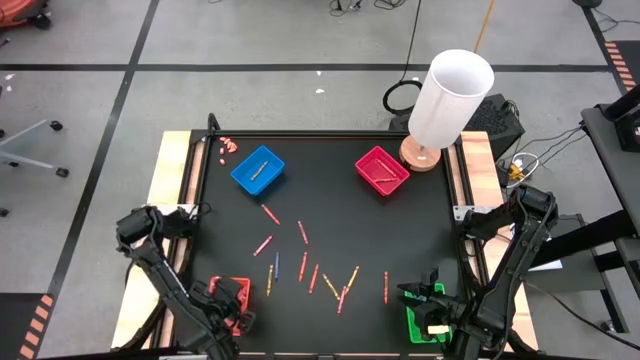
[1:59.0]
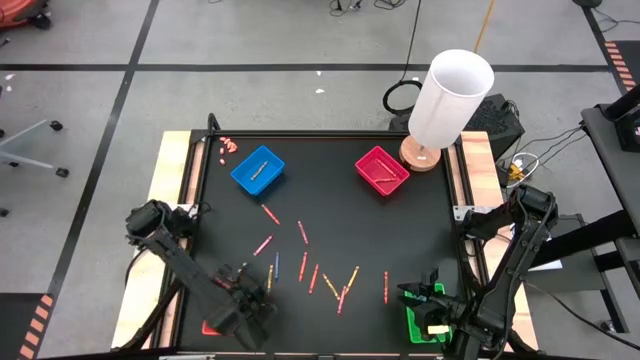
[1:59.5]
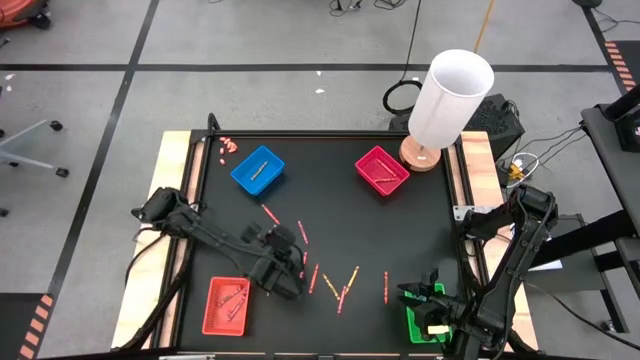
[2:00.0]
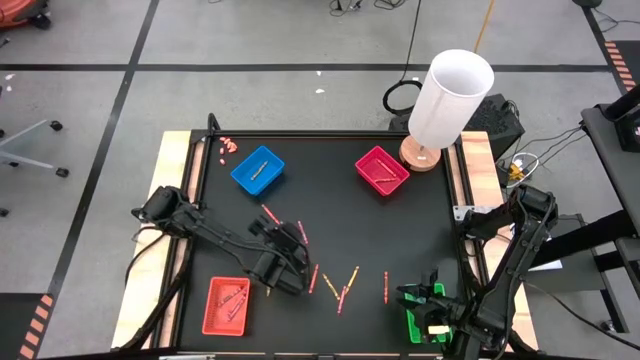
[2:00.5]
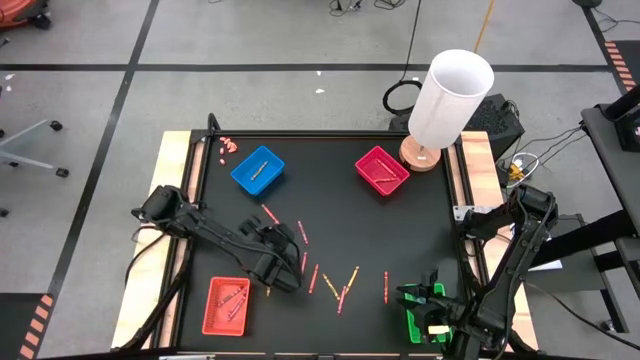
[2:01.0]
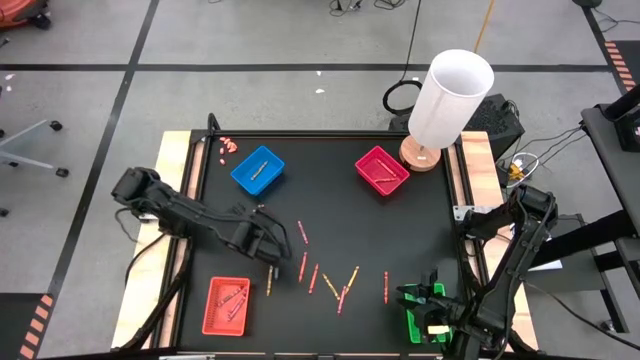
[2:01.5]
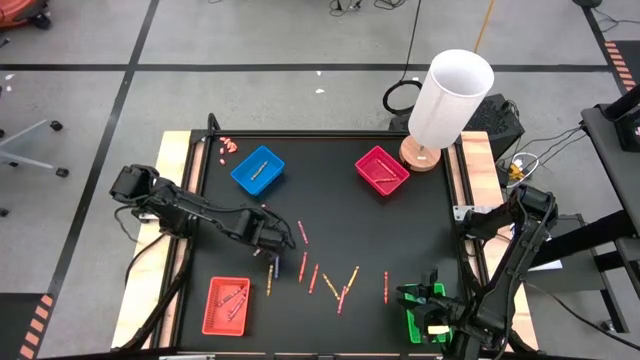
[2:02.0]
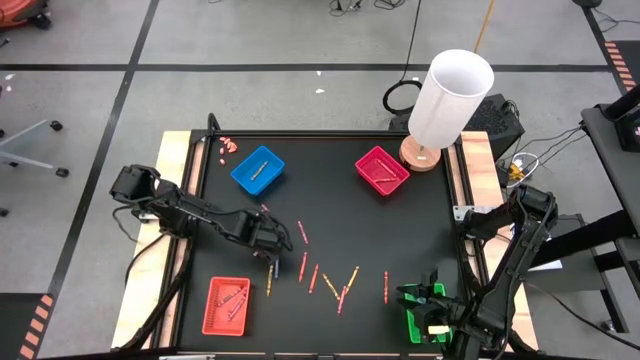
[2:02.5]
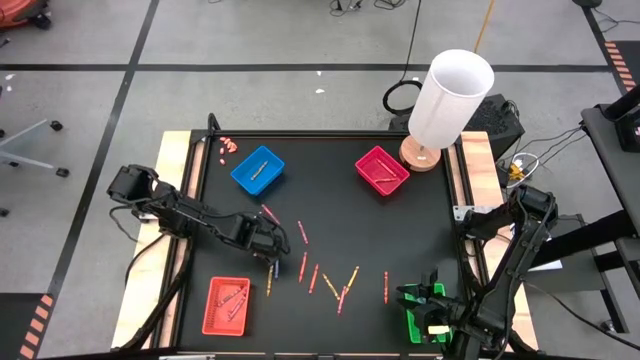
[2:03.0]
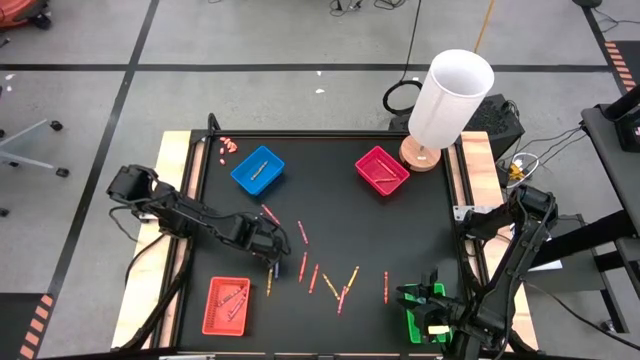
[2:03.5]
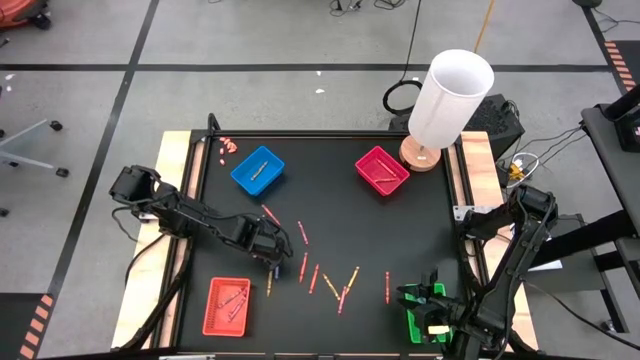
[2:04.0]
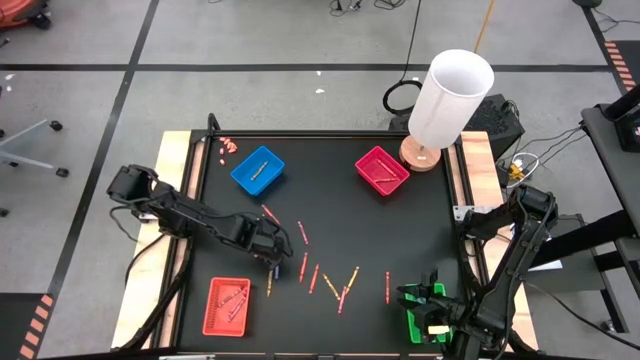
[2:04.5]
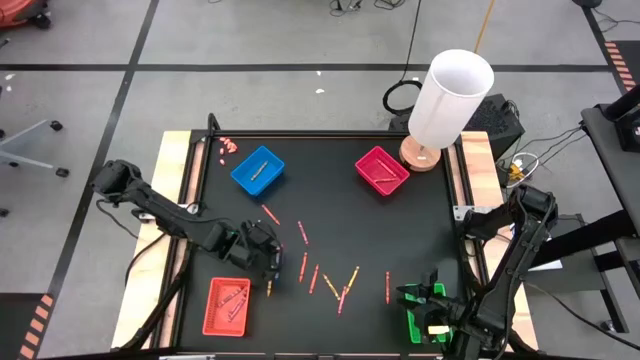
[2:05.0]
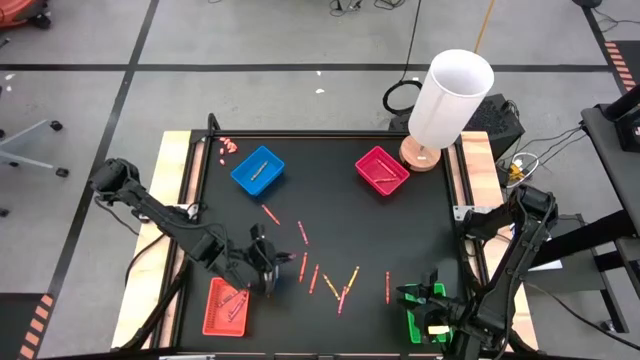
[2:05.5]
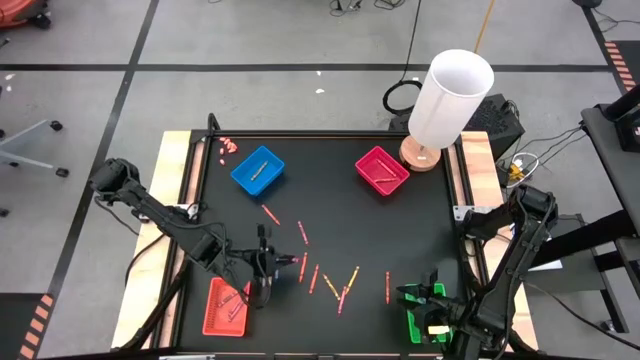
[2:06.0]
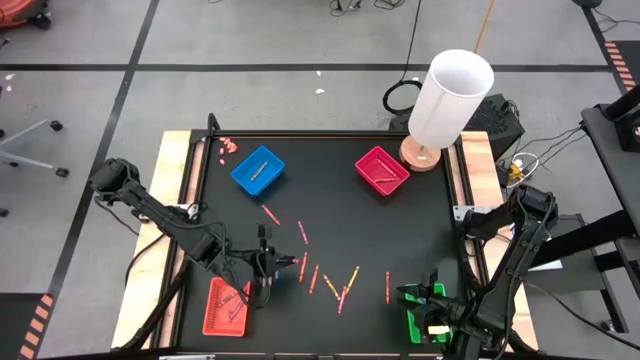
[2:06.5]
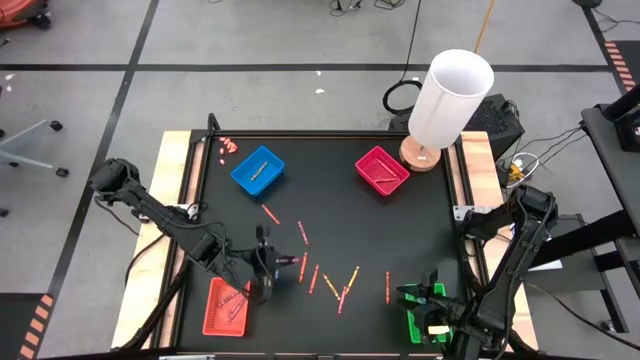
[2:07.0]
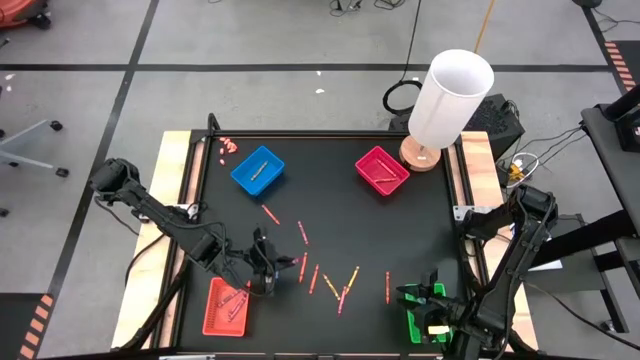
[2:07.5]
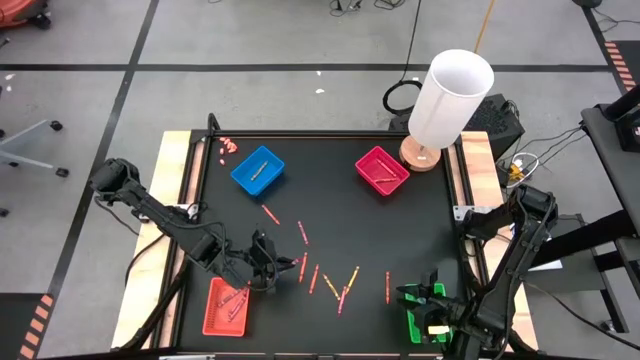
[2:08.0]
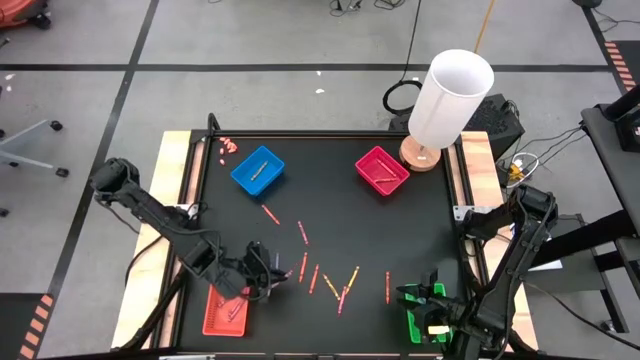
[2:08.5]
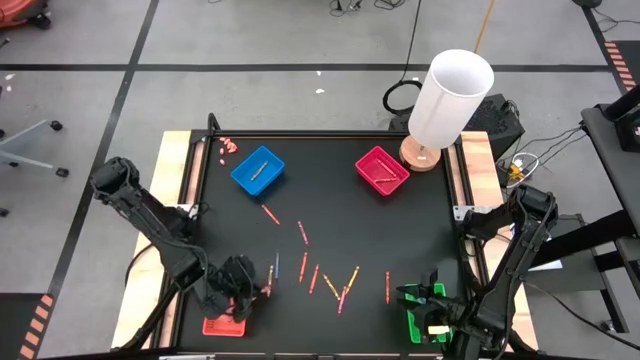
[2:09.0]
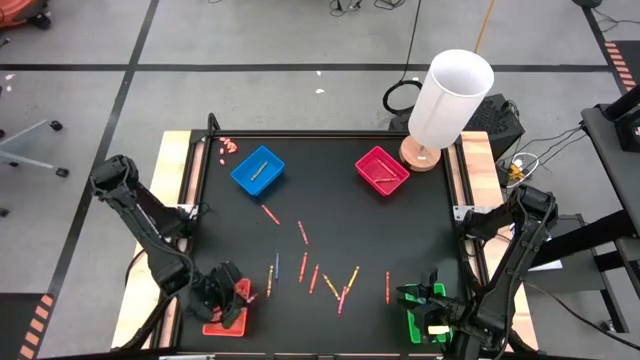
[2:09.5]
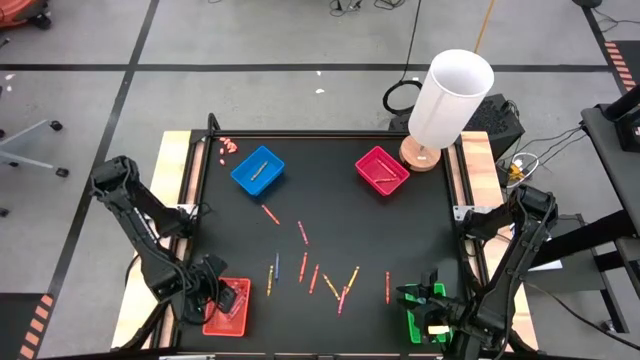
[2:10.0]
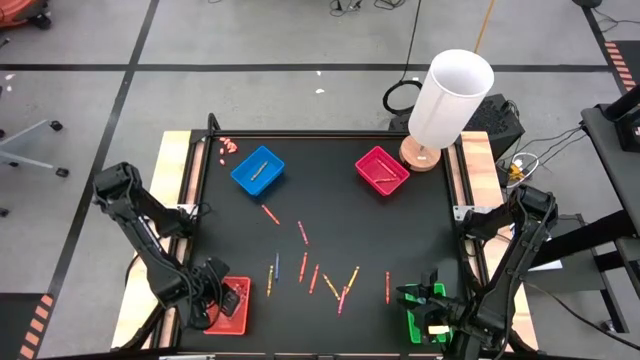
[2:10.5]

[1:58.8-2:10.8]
Task: Sort crayons
Put the red crayon into the orange bin

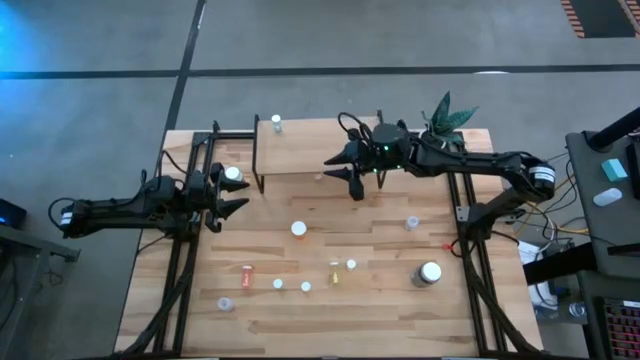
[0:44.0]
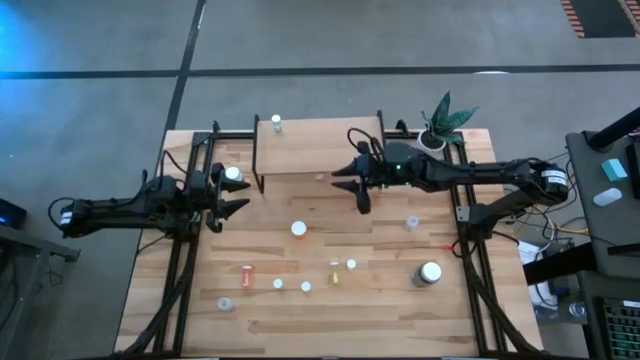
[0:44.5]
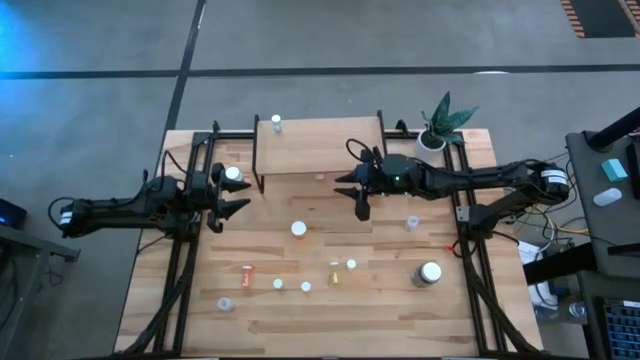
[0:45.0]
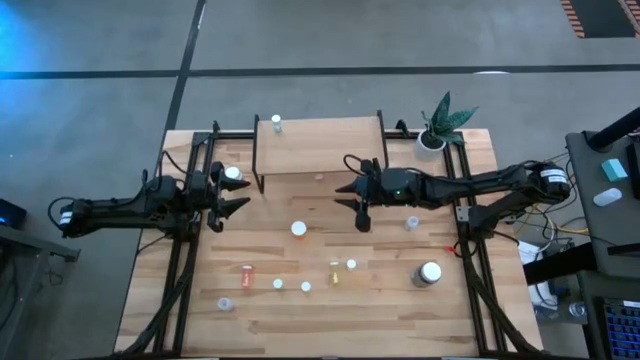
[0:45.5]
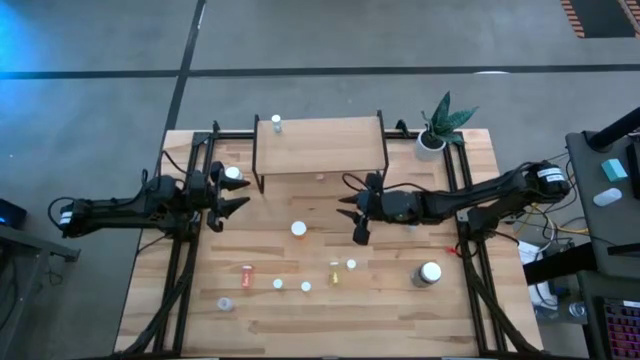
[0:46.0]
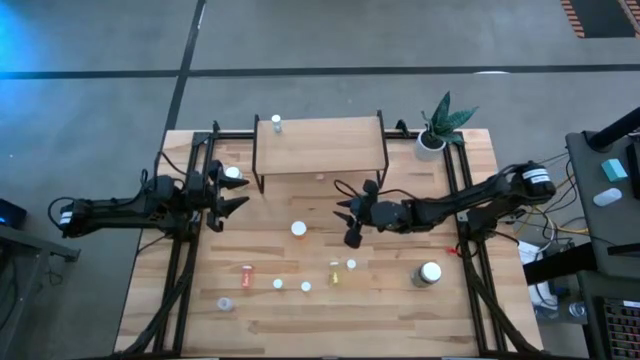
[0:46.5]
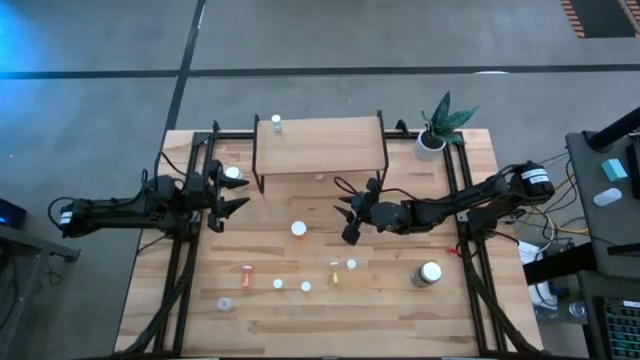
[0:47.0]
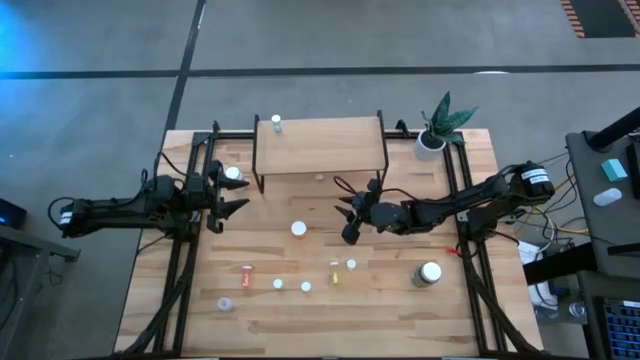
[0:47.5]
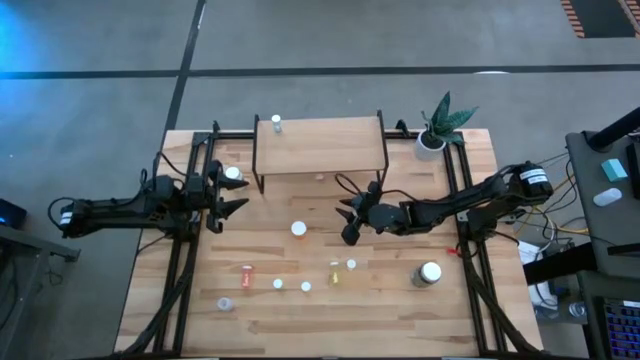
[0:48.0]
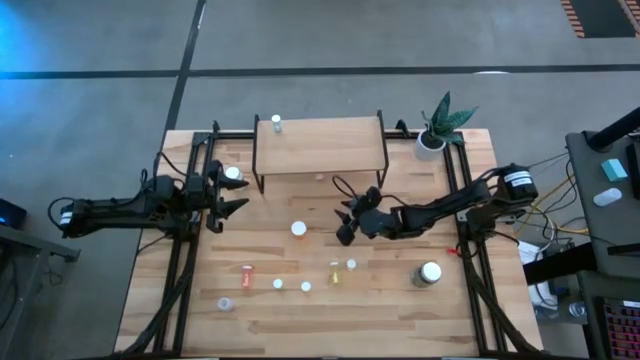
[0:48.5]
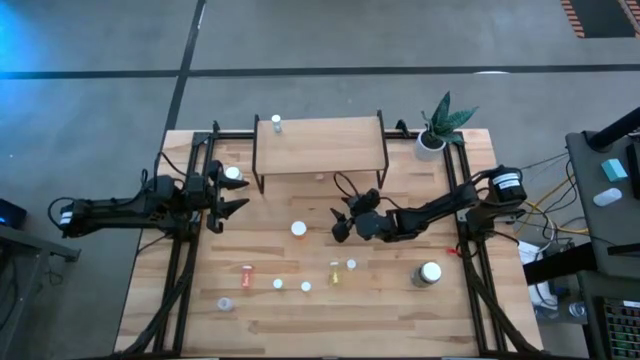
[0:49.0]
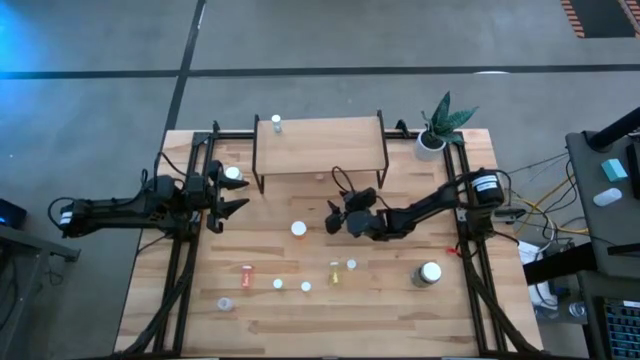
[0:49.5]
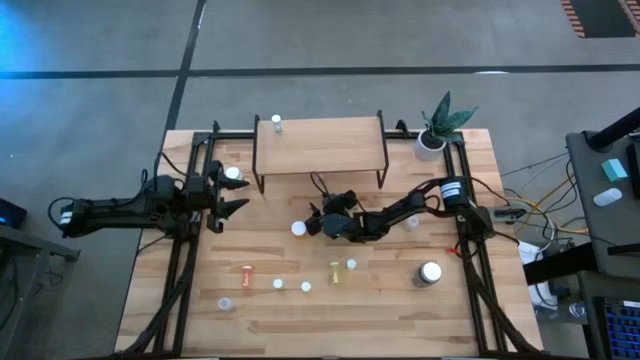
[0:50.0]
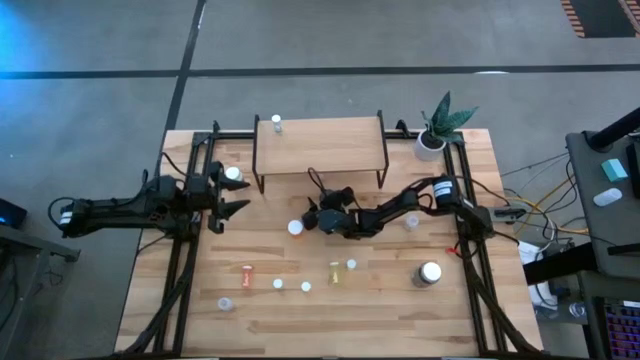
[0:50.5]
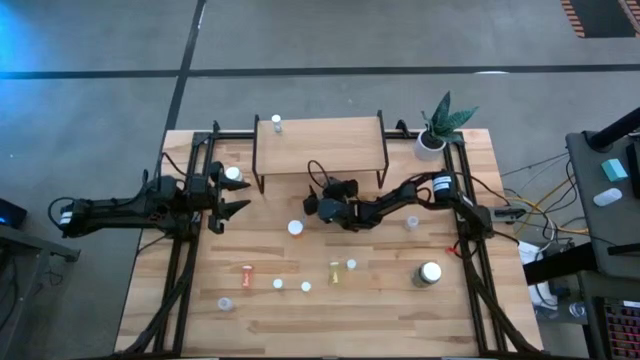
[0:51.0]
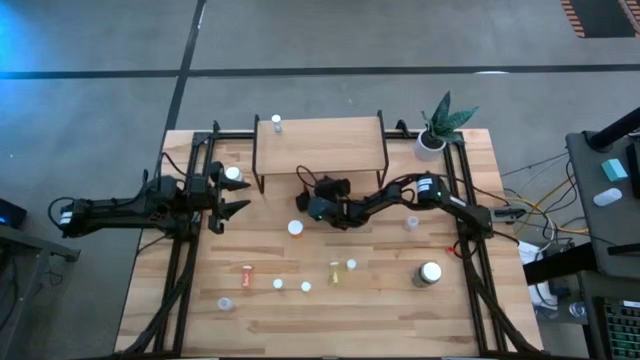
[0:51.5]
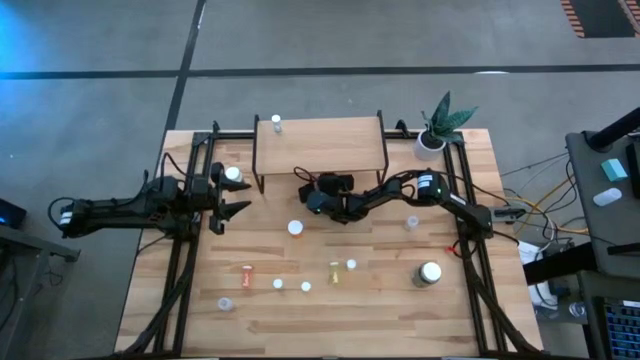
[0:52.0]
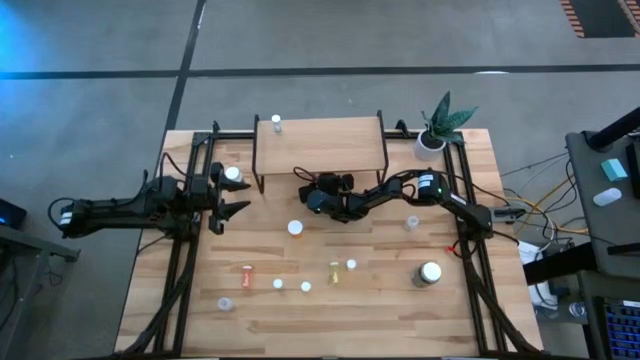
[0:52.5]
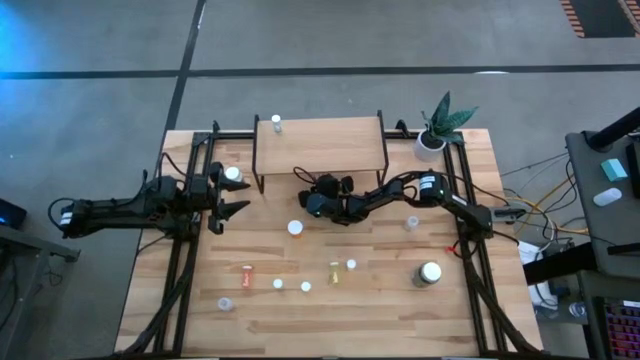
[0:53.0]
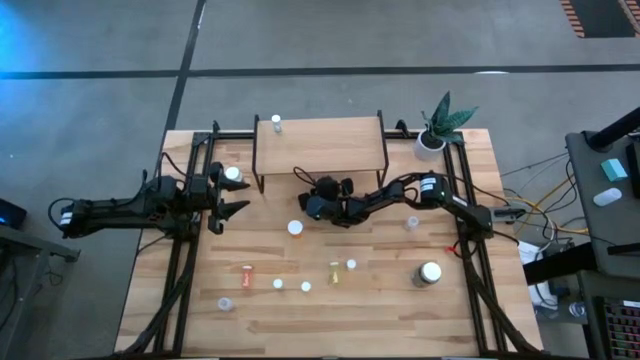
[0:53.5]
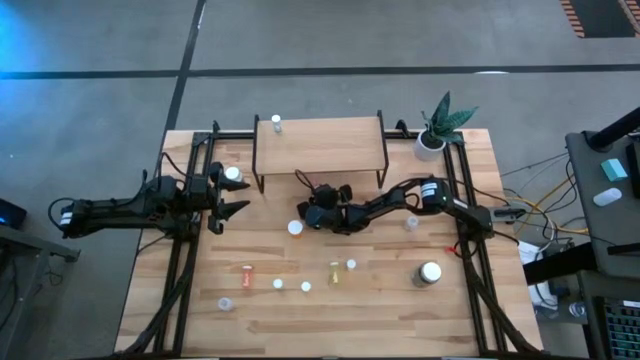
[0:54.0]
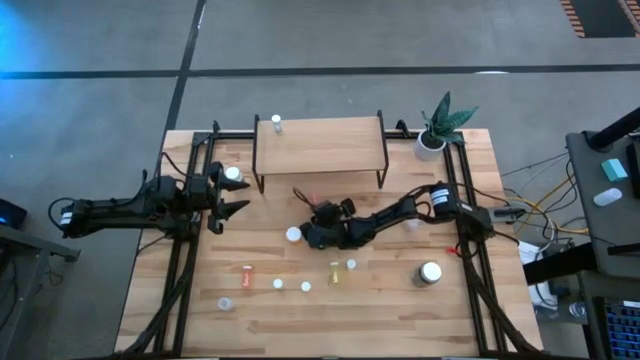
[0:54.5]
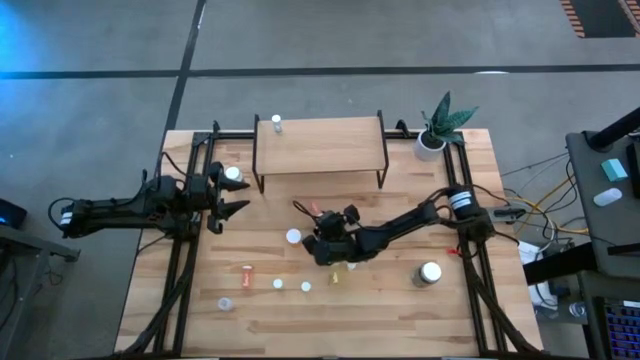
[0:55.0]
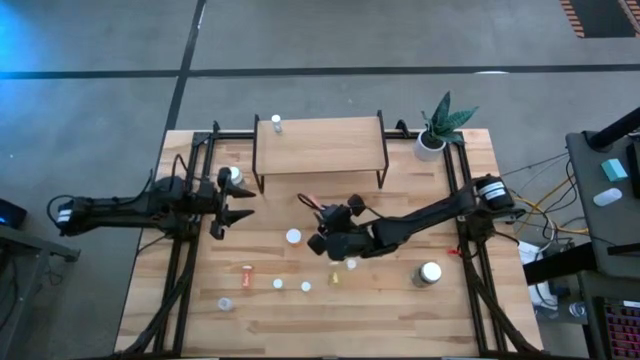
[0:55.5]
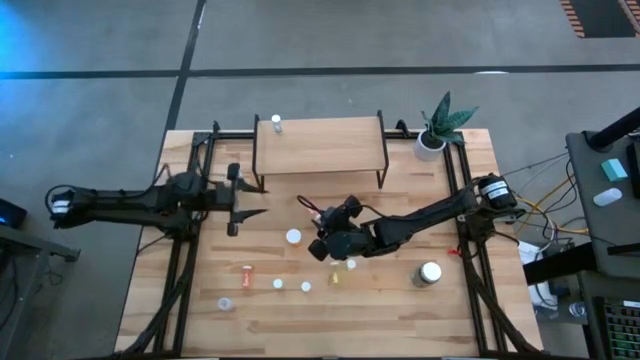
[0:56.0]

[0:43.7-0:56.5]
Task: Pick and place medicine bottles onto shelf by color
Put the right pink medicine bottle on the shelf
